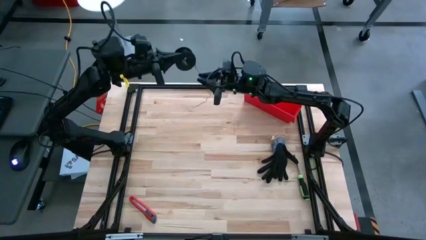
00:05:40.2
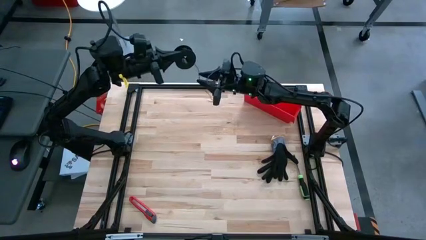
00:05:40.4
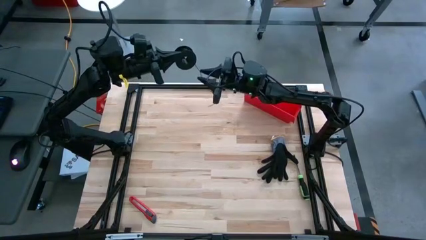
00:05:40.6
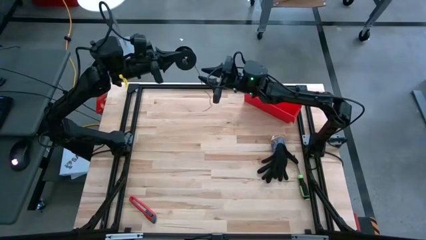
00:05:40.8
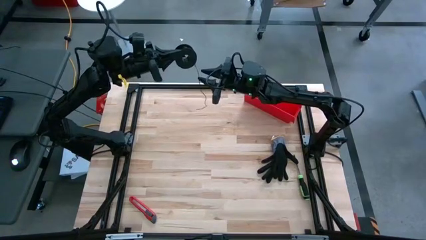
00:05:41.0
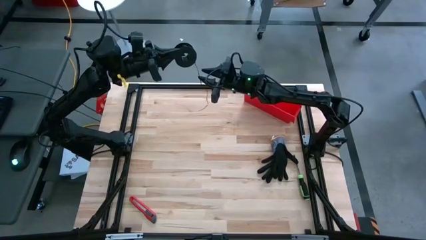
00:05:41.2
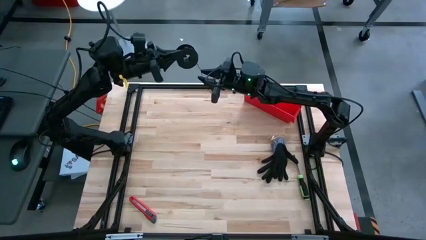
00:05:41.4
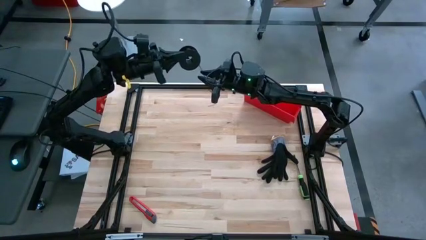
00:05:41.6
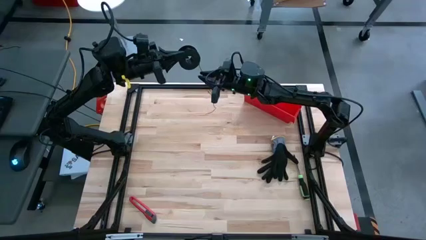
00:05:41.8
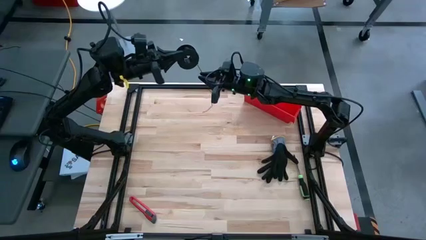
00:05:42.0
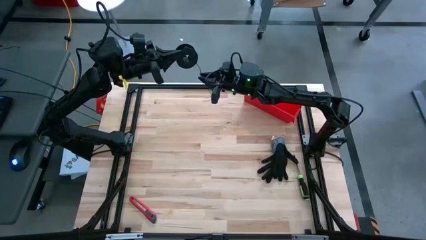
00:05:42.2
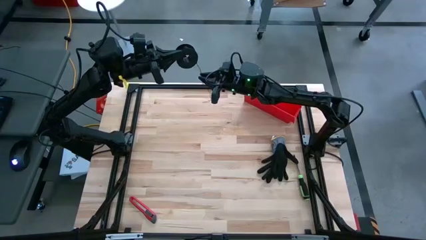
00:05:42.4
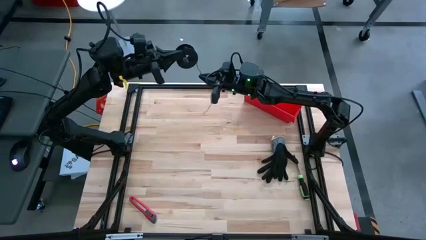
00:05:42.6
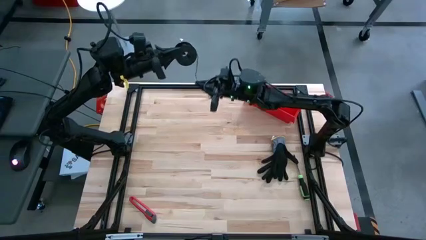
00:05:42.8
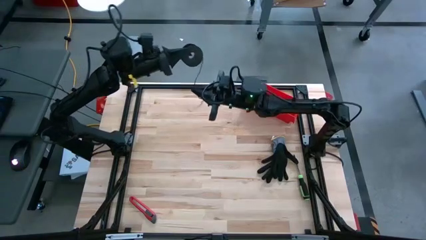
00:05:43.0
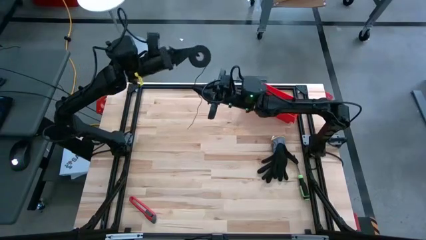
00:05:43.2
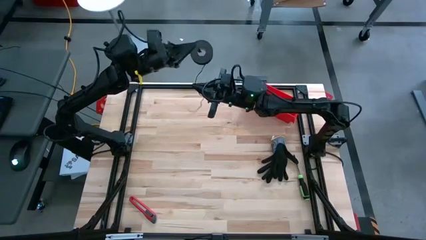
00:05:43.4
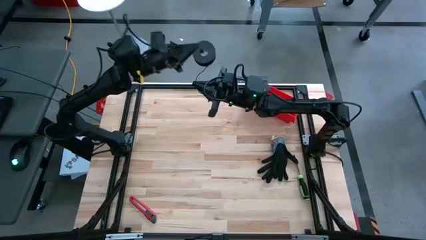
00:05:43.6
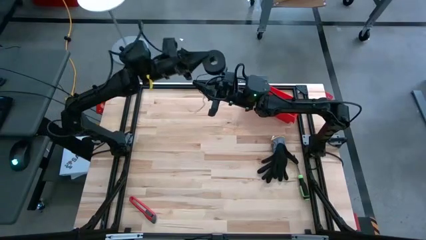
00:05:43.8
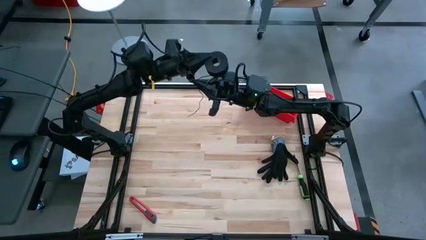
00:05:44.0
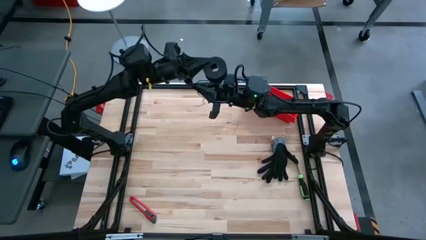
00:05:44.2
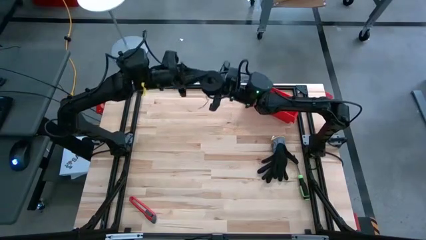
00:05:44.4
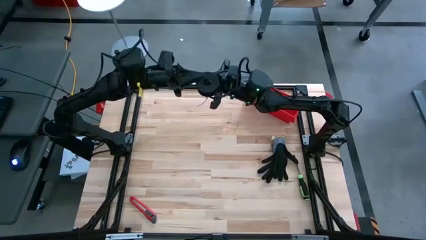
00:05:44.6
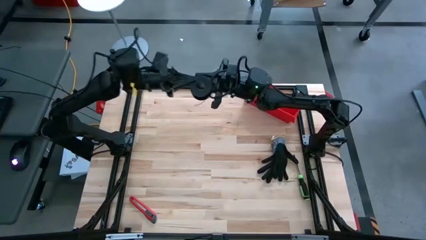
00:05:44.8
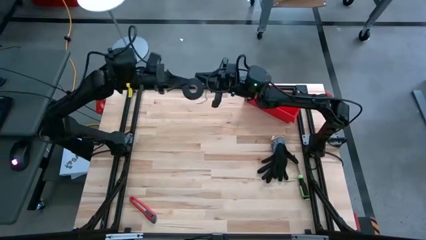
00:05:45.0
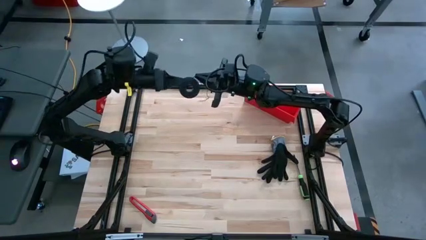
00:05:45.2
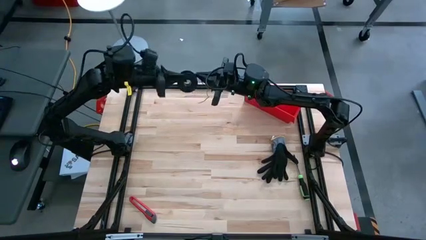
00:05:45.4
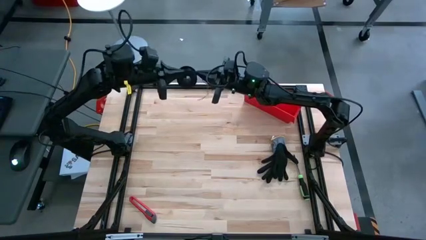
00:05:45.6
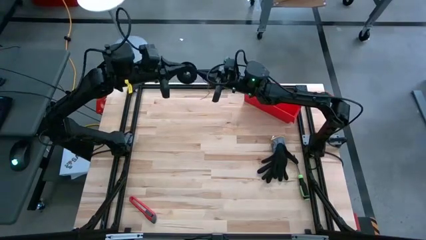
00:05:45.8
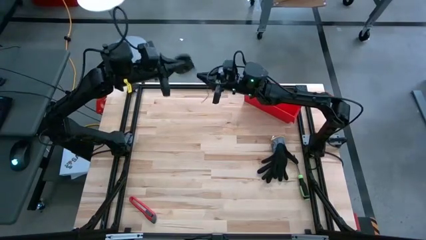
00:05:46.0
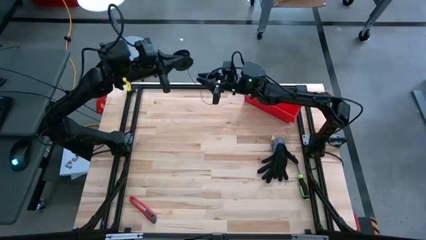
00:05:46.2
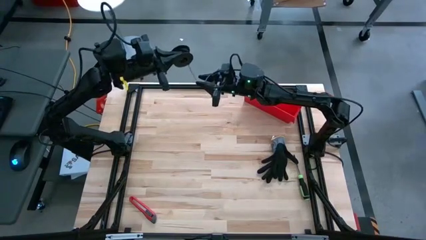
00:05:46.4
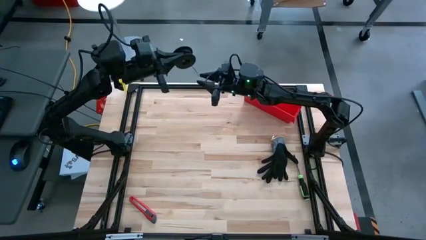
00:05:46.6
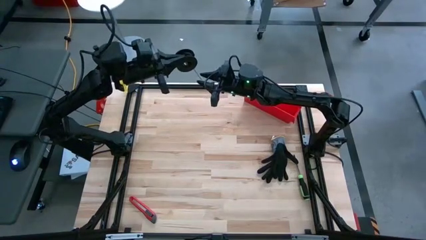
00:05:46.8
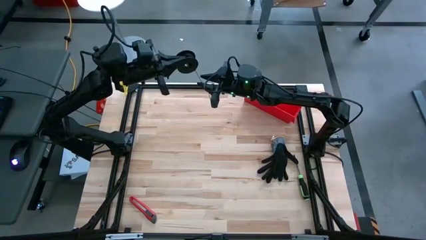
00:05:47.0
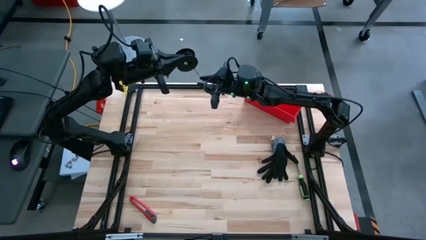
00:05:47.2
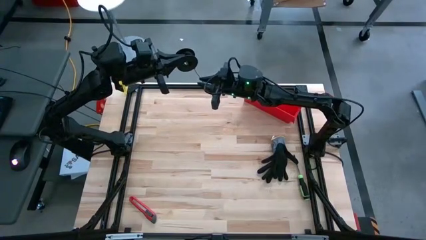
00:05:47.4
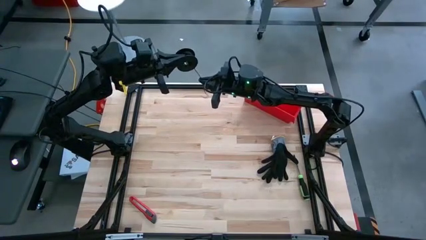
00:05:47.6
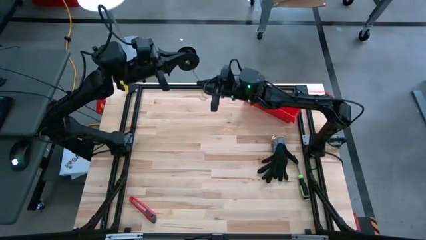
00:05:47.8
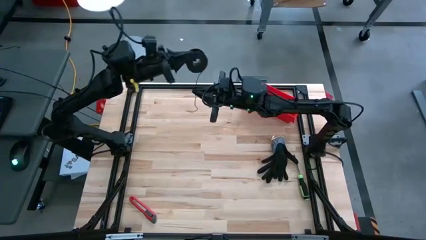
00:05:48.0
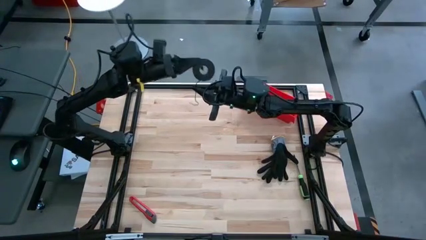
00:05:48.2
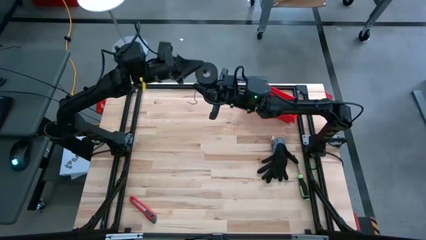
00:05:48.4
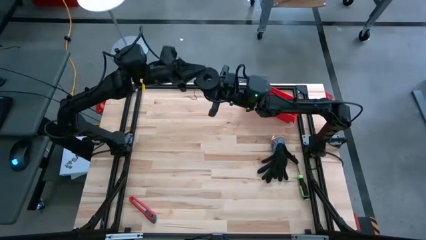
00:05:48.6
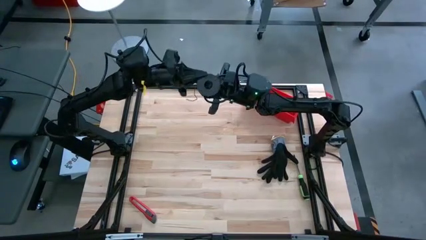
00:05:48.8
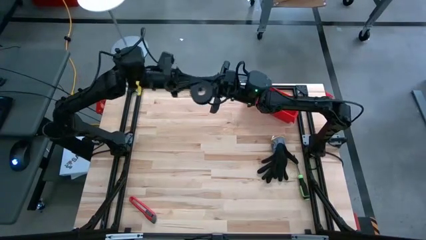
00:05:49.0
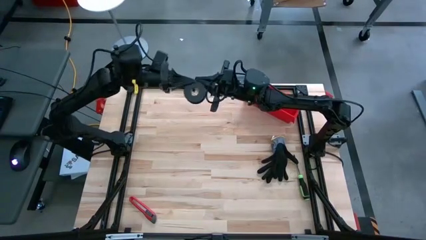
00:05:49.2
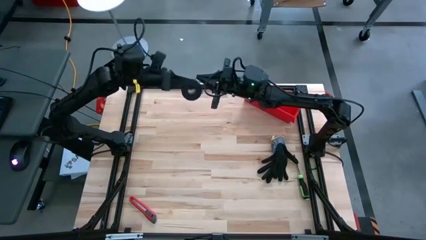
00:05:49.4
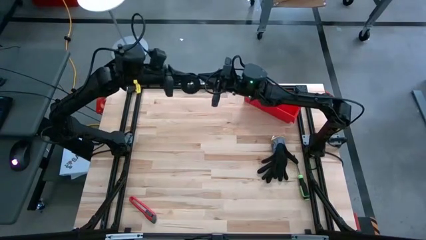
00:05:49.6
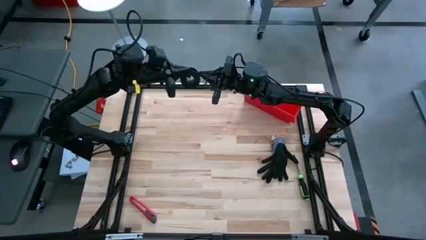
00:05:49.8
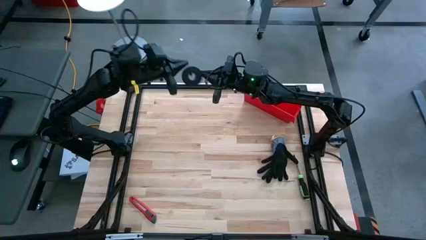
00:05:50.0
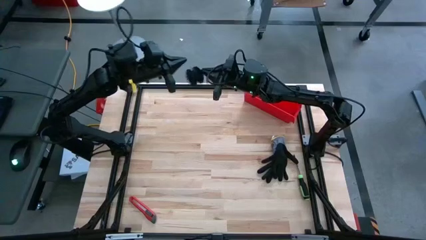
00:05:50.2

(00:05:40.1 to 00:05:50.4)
Task: Coil cords
Coil the black wire on the spool

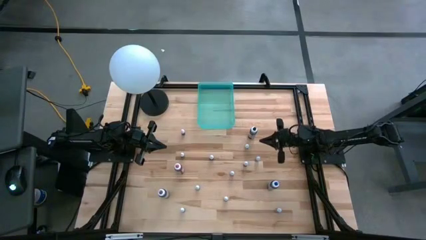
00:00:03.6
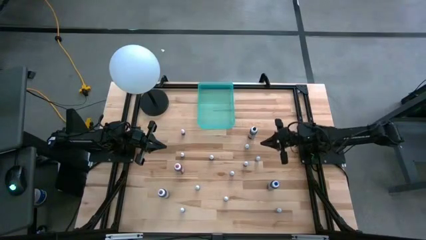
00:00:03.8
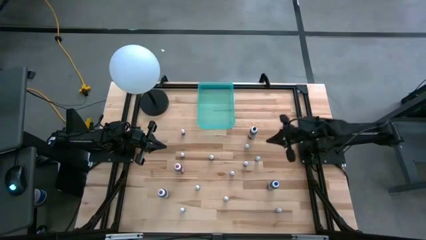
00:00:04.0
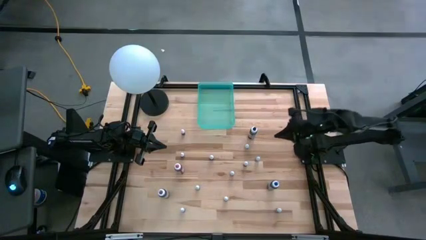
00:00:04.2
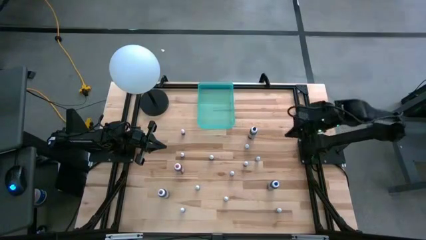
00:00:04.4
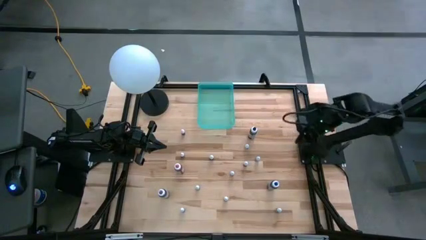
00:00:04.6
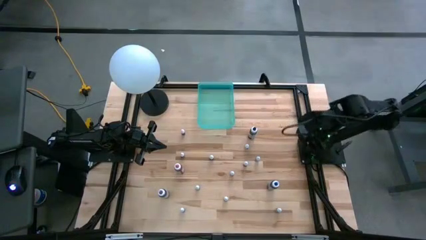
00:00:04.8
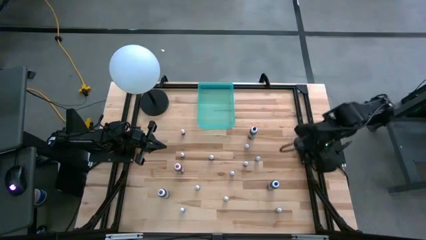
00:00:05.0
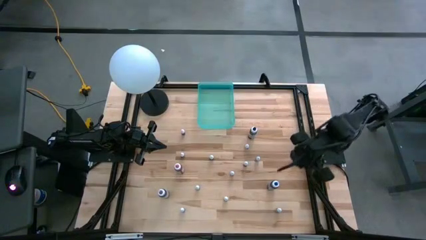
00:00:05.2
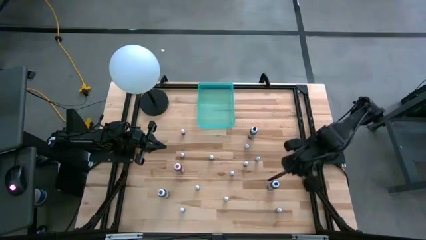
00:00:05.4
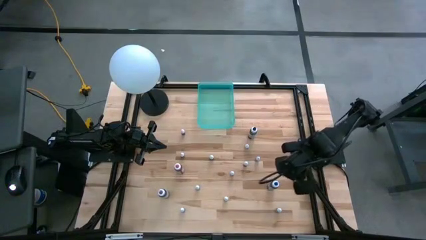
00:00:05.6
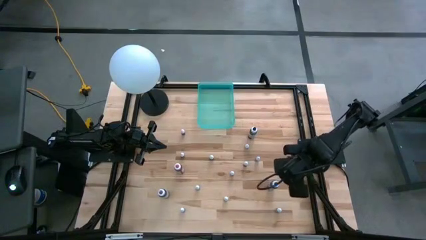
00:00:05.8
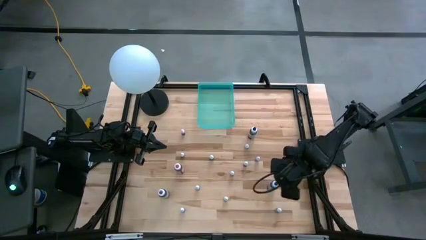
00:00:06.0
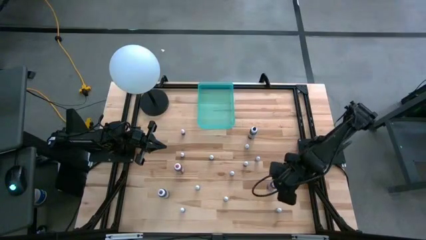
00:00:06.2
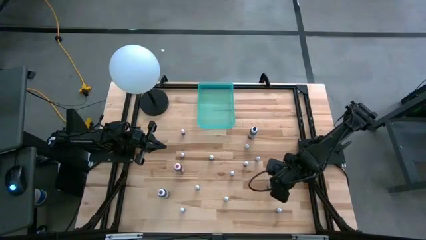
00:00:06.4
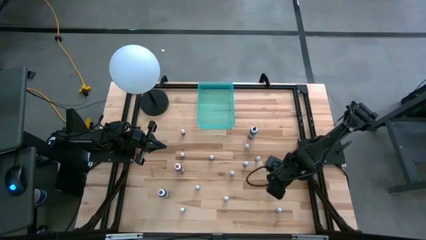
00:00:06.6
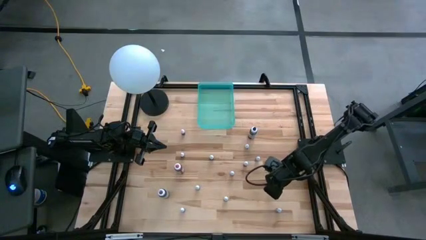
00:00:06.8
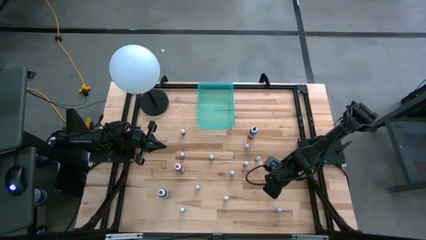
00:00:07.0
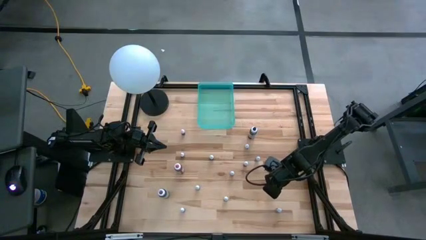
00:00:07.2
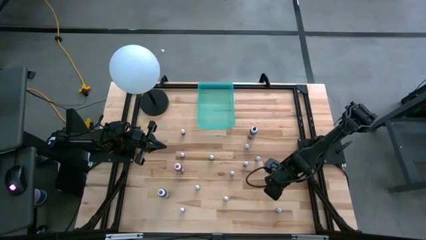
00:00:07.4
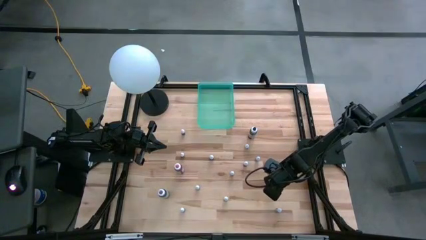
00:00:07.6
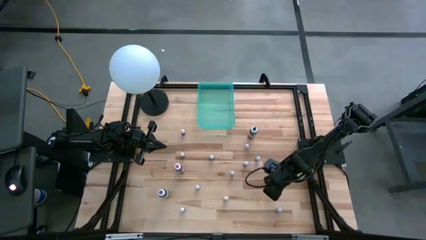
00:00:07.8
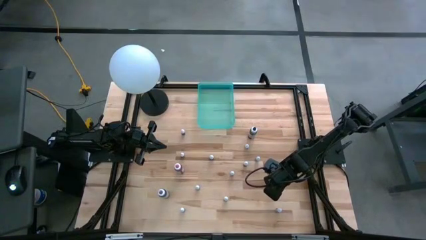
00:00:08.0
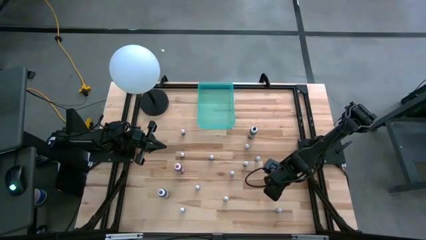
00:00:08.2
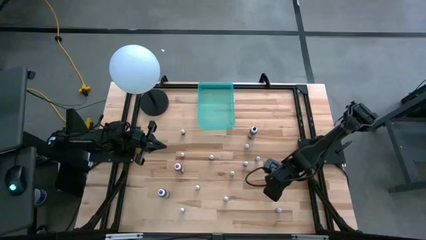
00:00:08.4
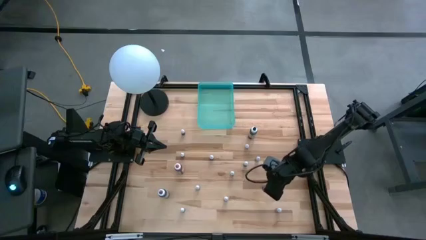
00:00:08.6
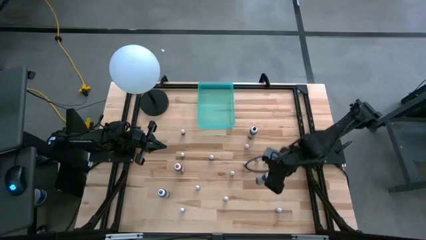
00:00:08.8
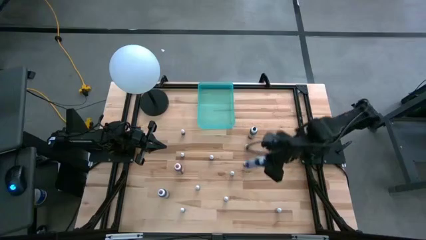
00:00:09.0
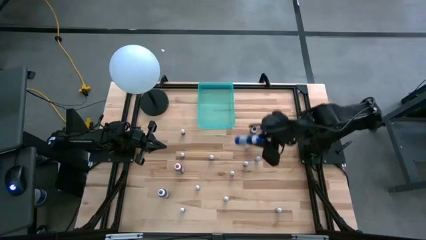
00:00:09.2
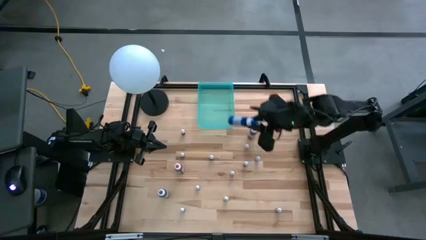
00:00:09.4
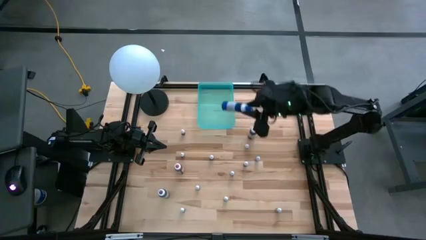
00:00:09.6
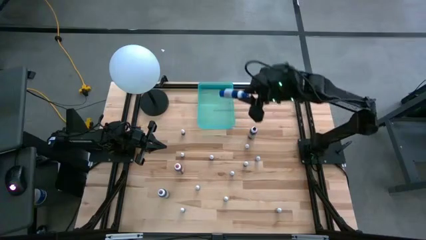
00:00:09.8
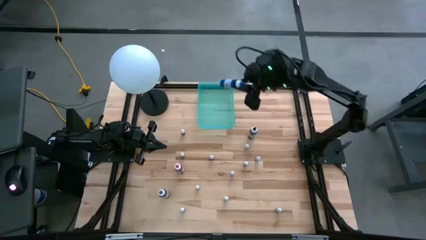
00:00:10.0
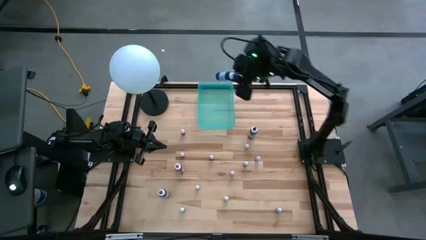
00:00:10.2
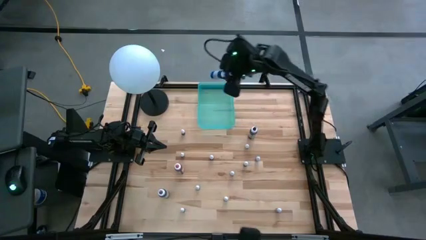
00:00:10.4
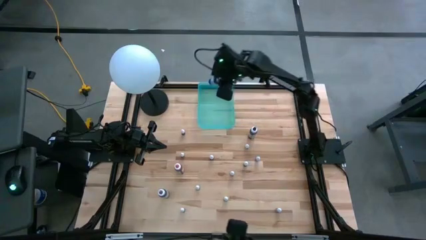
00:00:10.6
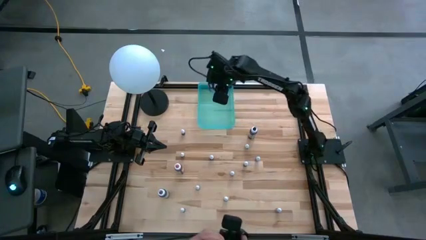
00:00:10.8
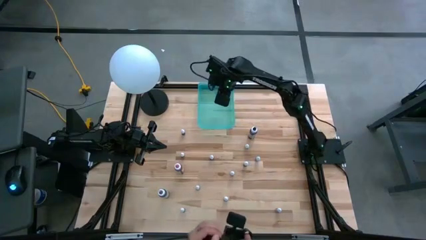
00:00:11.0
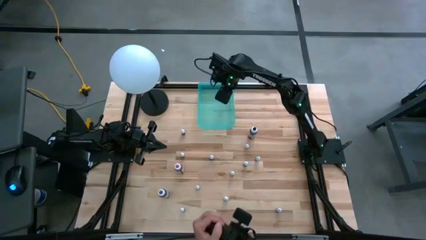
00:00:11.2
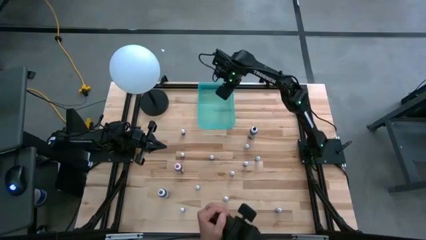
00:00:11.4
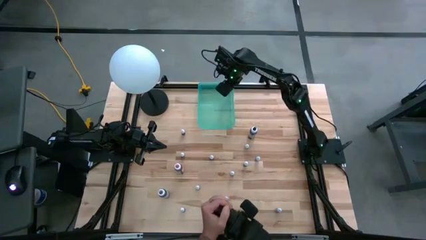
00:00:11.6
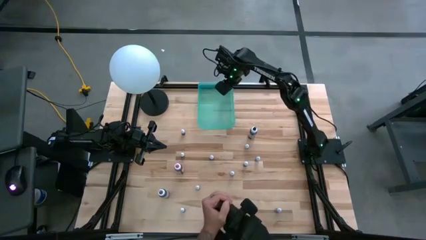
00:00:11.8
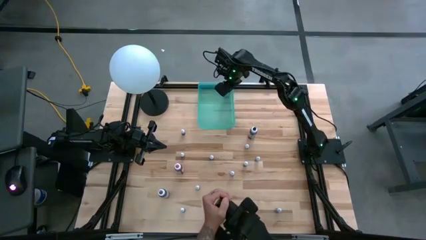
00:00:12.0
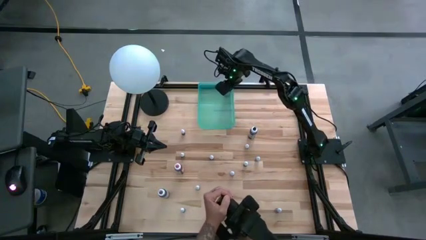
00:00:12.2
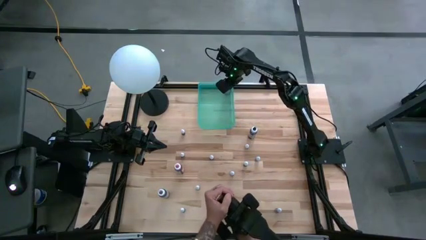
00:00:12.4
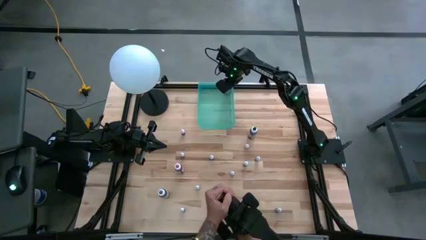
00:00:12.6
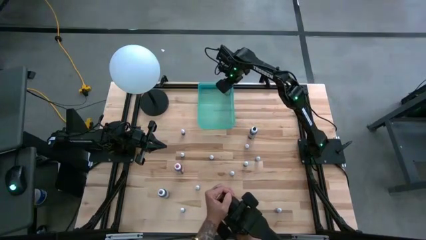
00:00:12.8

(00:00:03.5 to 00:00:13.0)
Task: Pick & Place food coloring
Put the large blue food coloring bottle into the light blue bin
